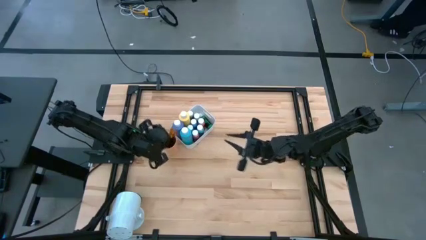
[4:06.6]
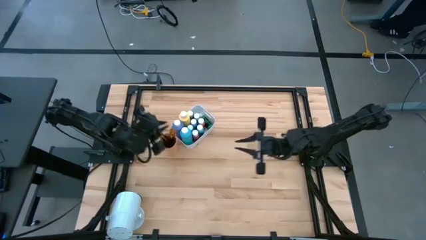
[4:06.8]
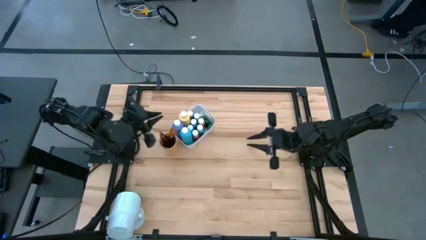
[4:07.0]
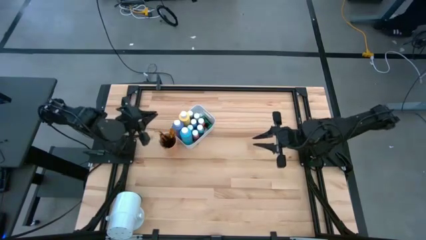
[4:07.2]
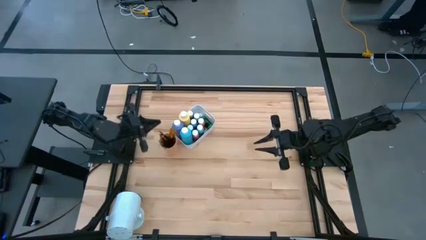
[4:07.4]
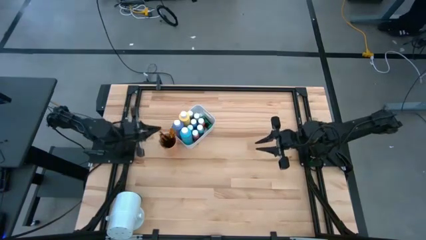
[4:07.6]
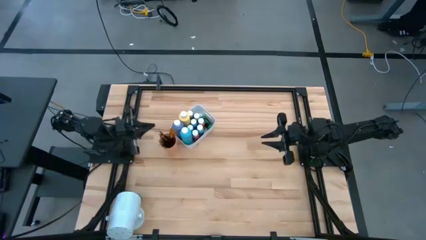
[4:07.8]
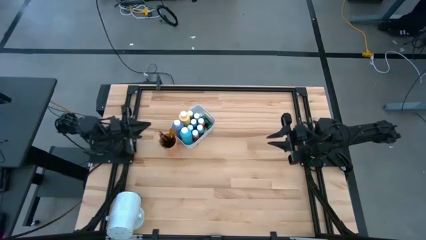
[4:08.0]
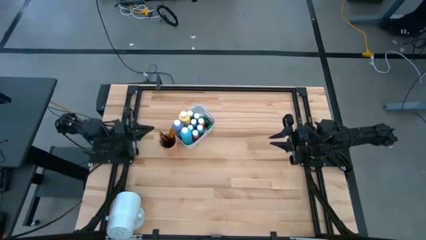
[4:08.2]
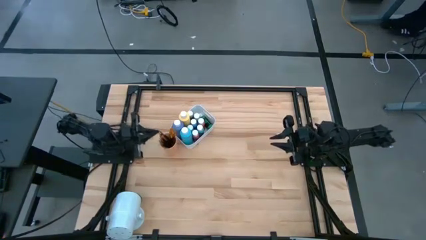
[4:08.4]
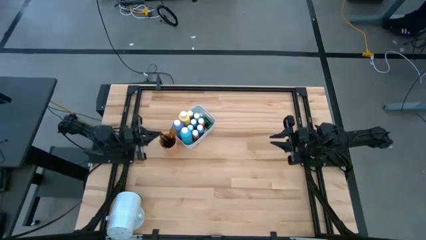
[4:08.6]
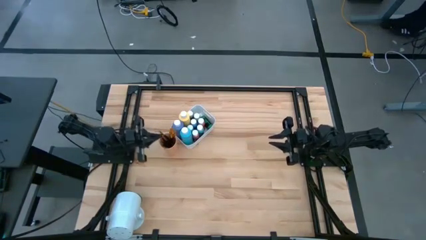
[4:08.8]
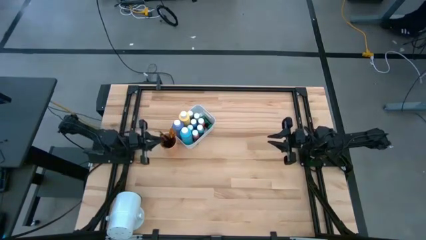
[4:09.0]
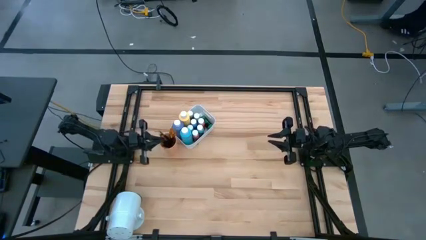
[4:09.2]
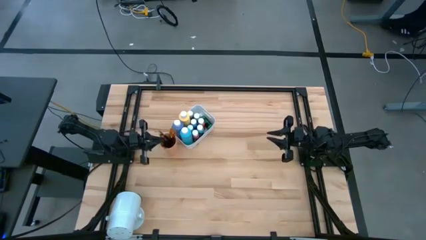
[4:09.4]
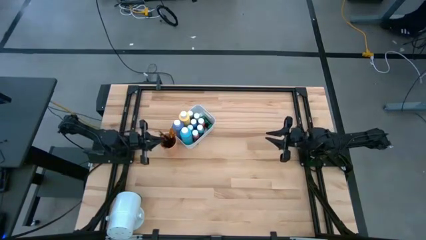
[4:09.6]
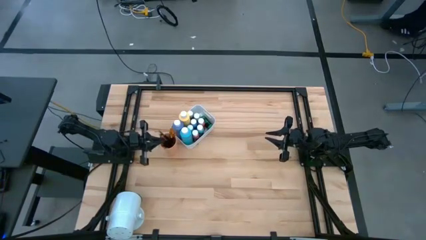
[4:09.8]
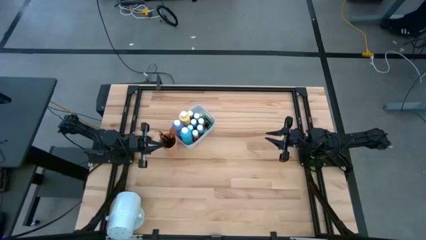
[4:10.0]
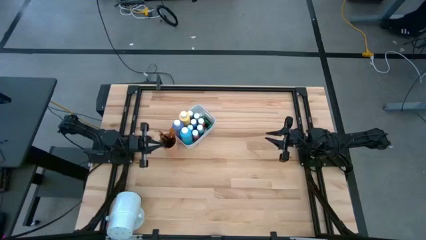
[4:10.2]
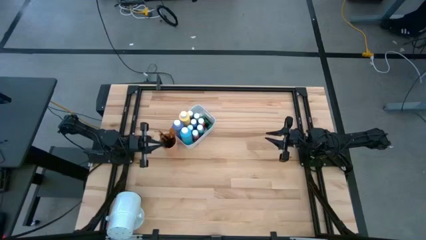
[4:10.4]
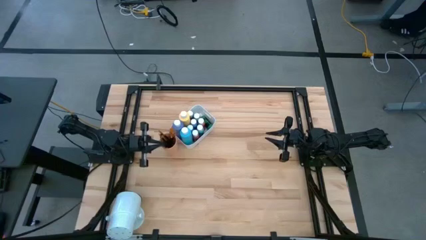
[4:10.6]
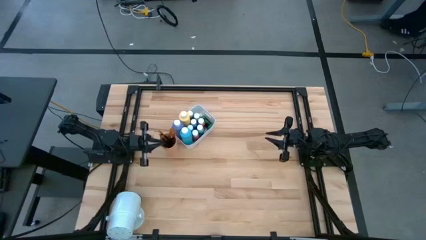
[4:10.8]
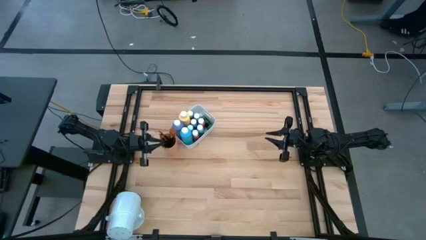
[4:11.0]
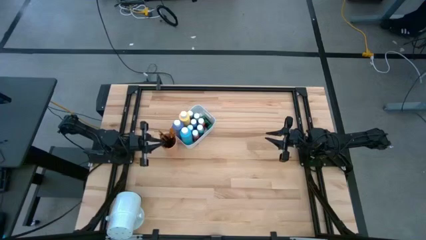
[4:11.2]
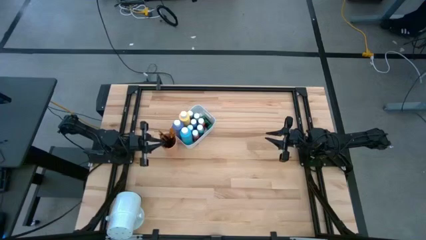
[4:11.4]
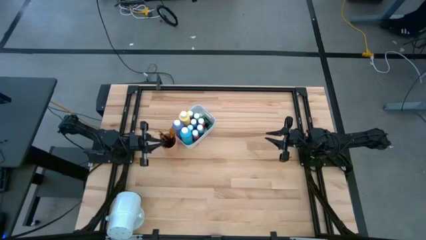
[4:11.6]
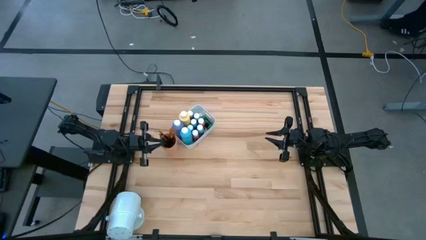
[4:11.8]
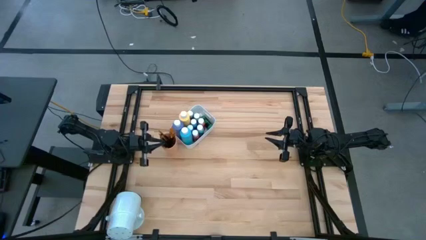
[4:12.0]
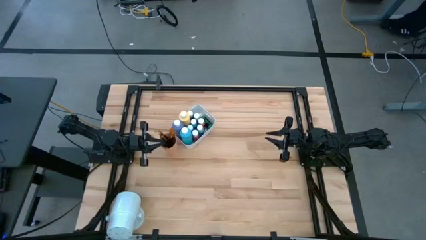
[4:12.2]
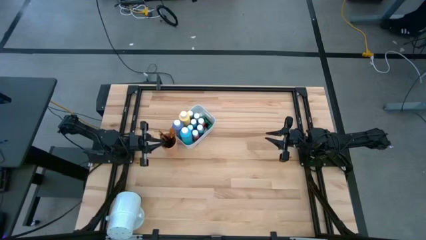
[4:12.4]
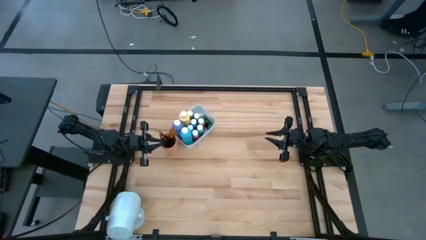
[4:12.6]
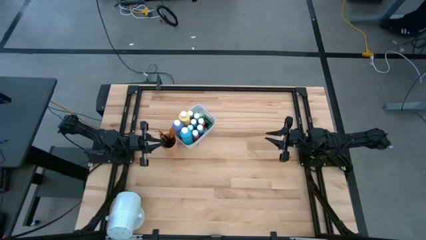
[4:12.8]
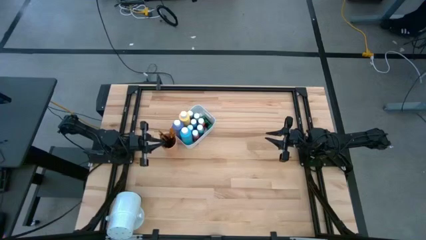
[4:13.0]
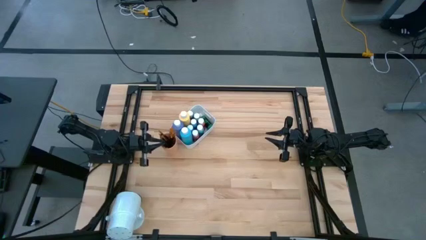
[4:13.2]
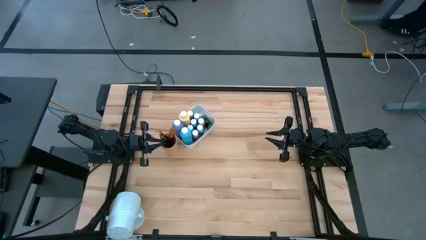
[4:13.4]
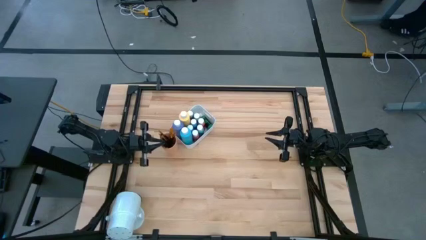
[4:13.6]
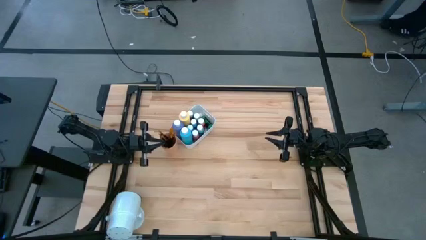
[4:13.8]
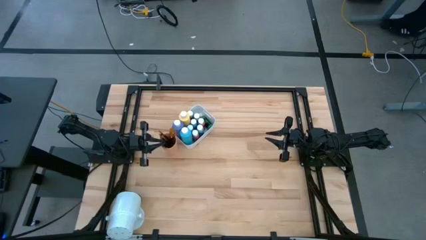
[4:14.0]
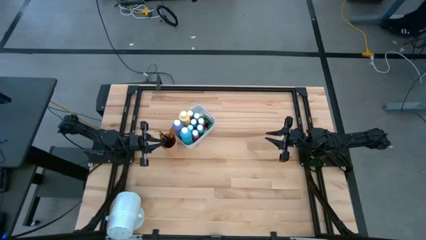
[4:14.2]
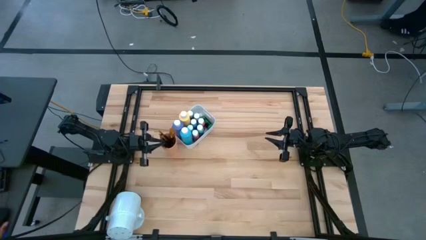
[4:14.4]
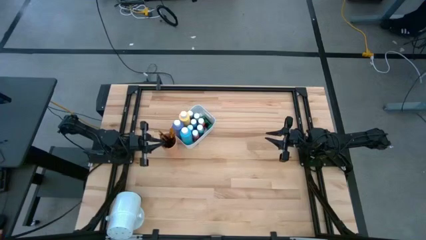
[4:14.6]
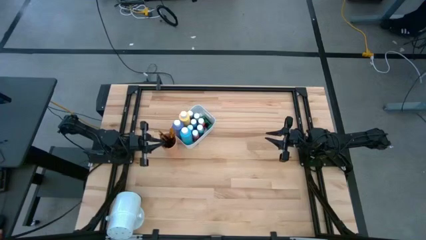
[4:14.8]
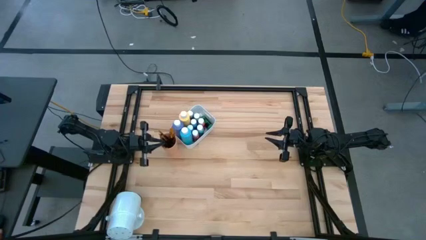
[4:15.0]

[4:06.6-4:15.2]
Task: Pick & Place Paint Supplies
Return to Home Position

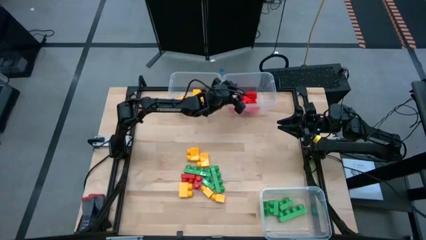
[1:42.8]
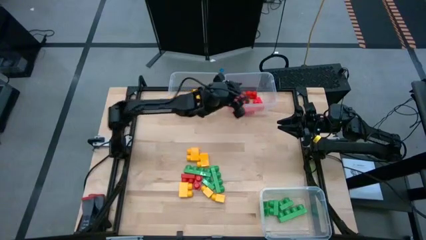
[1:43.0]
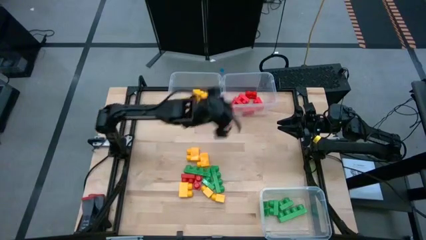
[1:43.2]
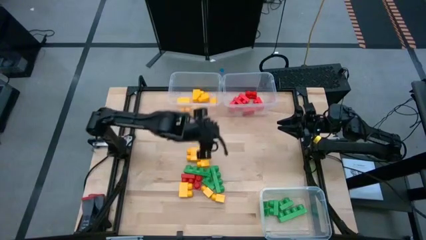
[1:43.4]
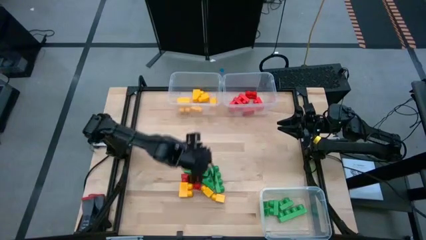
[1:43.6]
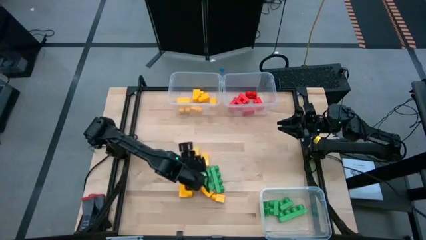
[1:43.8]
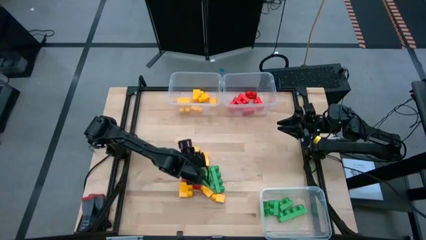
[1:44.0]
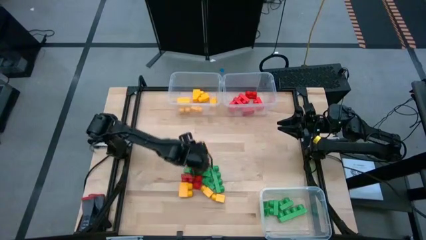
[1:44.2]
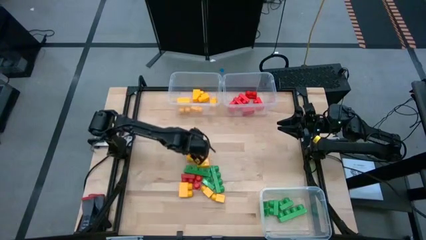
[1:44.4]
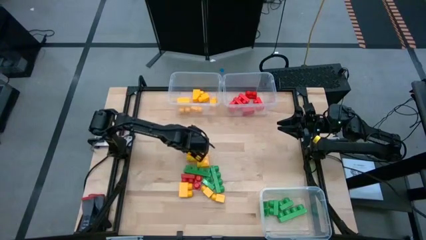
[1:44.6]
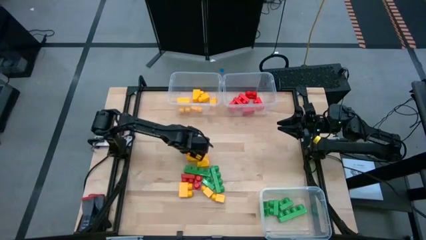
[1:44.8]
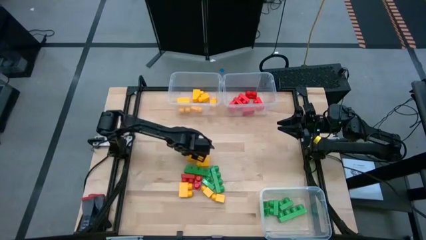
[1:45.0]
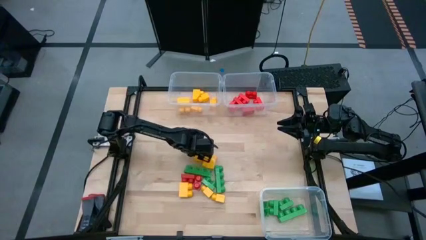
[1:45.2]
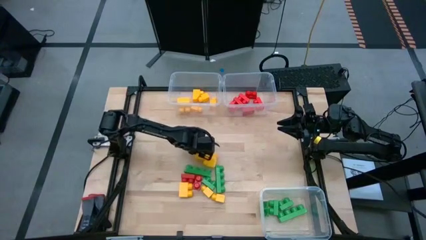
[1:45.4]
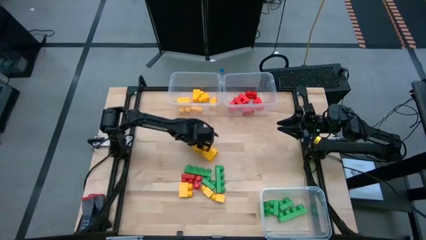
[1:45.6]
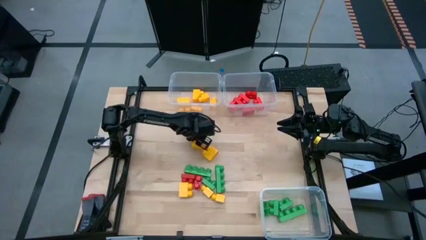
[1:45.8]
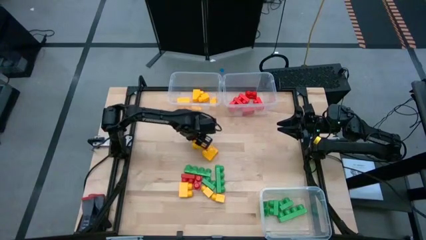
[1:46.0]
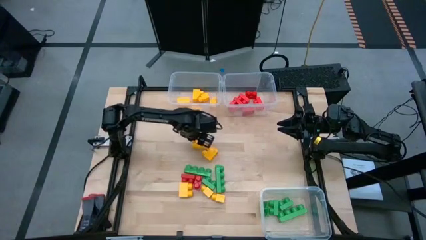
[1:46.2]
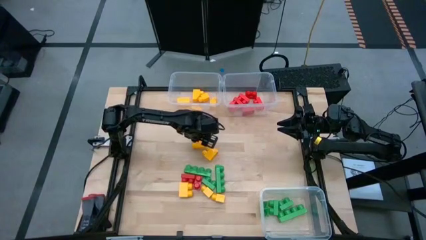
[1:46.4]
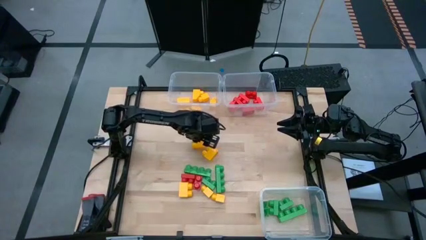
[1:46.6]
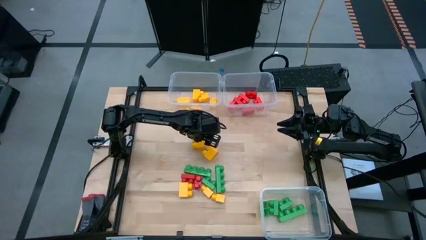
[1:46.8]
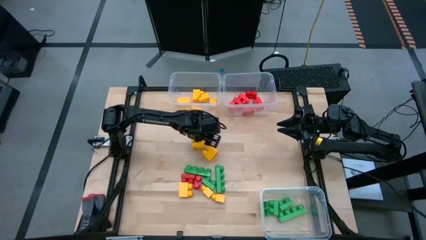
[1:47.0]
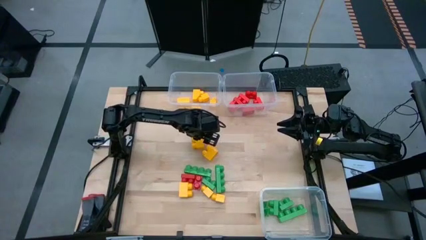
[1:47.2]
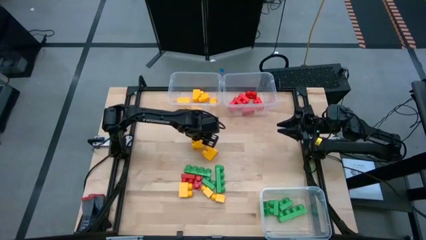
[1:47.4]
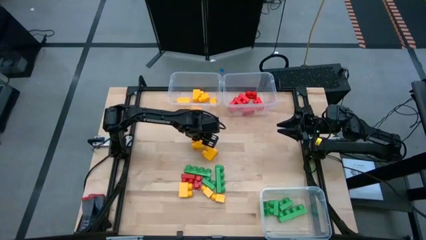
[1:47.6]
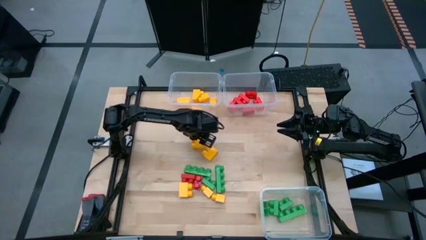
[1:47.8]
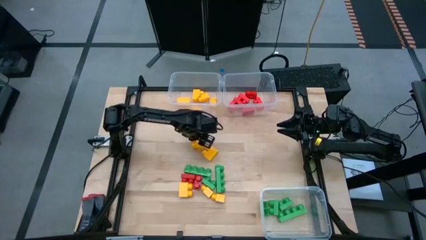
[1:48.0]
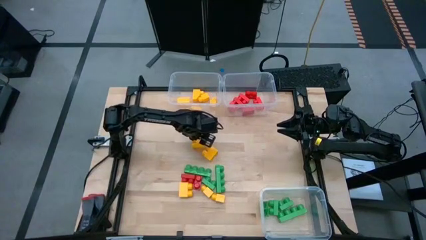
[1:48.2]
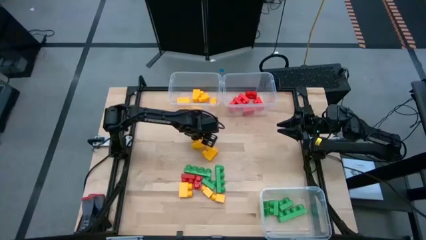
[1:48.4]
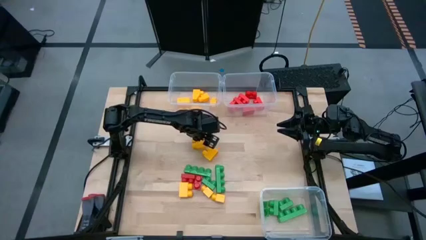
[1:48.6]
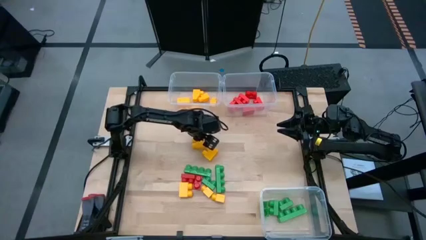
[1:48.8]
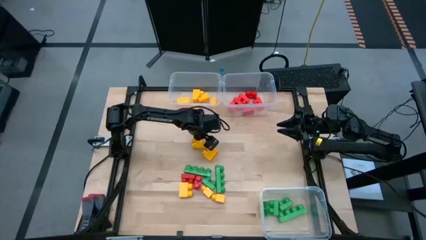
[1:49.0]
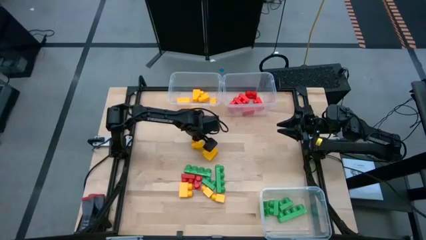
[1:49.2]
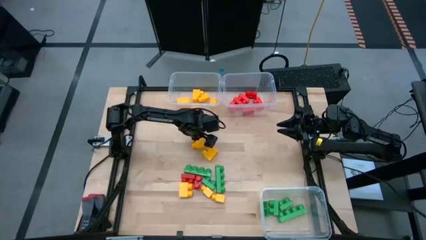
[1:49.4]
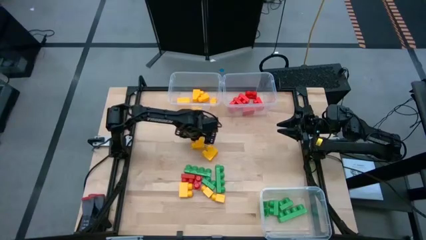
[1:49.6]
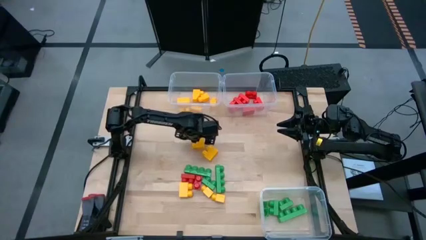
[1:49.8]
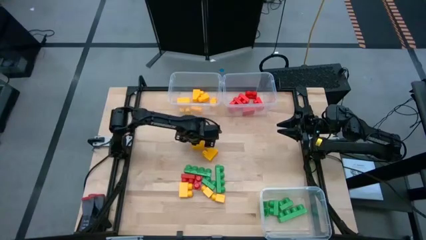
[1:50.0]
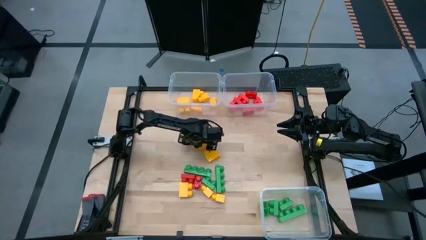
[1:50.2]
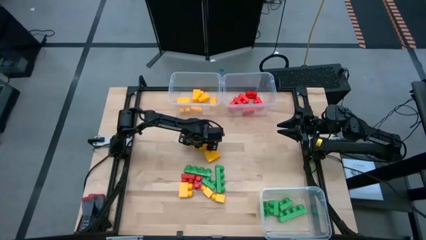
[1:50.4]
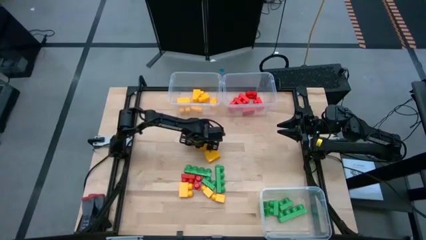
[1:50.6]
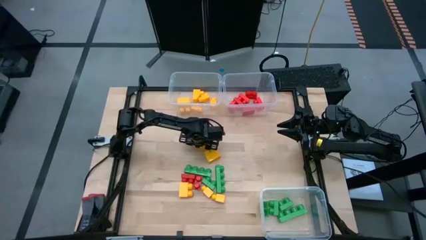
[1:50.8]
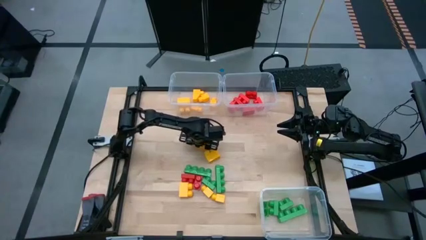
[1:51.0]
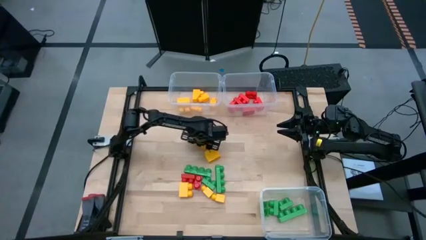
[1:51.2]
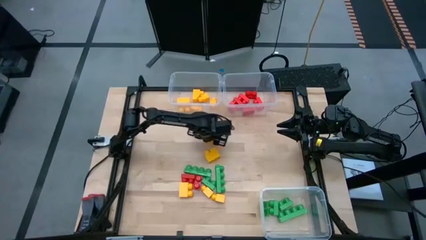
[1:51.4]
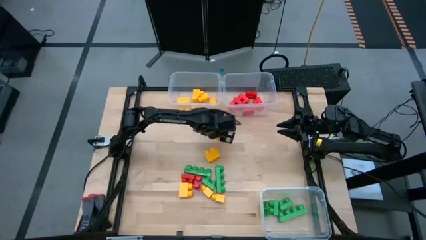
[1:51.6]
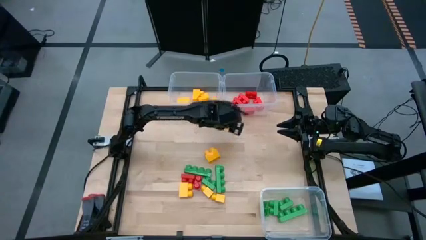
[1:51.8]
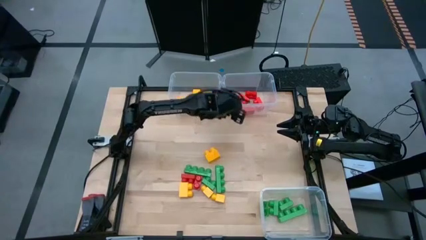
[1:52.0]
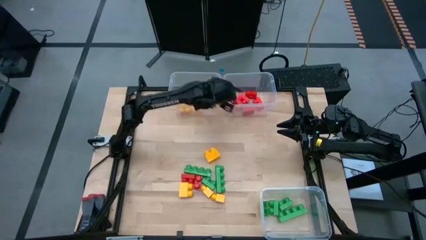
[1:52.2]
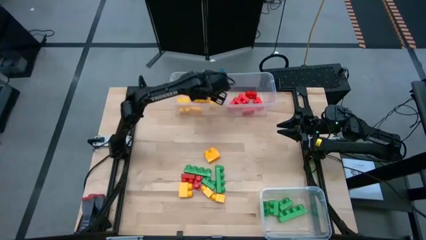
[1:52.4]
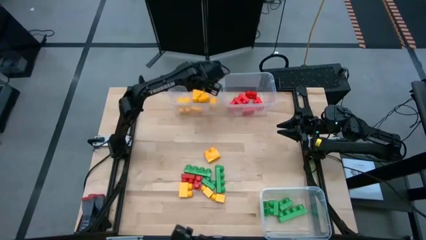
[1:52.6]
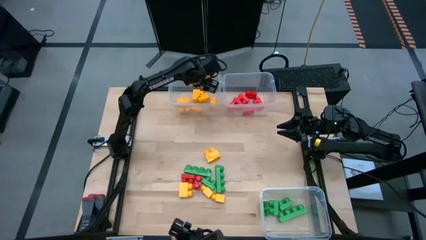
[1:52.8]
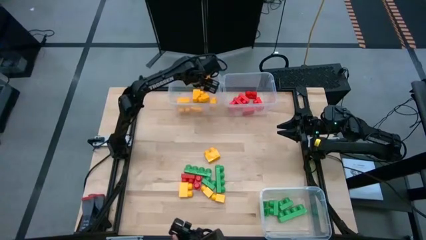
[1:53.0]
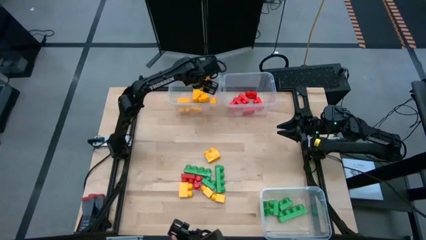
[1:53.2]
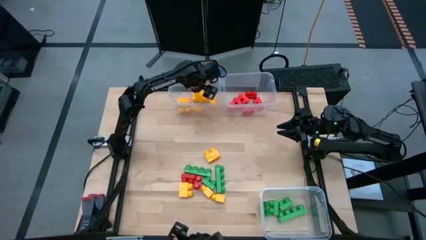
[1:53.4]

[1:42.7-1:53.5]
Task: Sort blocks
Put the yellow game piece into the top left transparent bin
